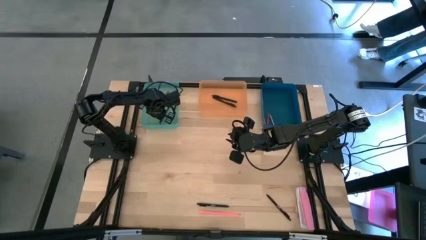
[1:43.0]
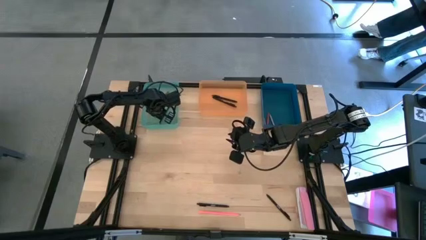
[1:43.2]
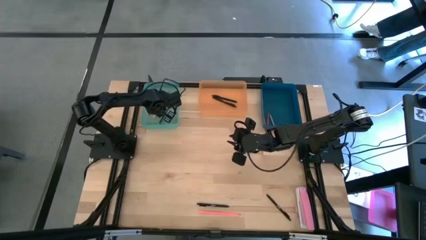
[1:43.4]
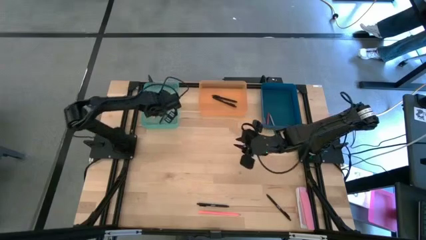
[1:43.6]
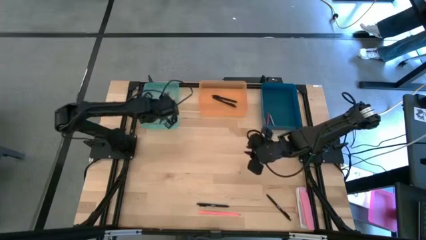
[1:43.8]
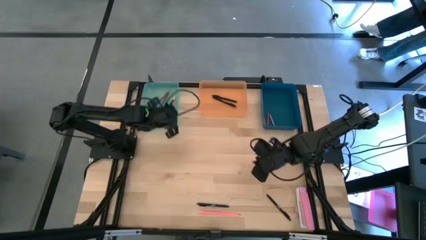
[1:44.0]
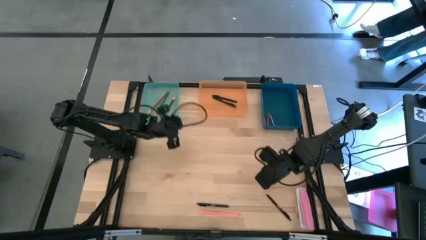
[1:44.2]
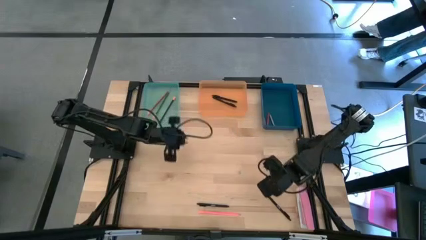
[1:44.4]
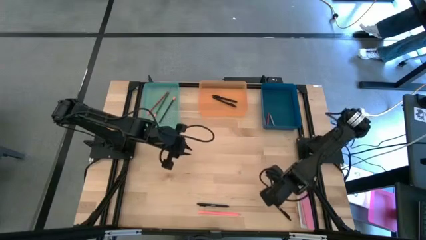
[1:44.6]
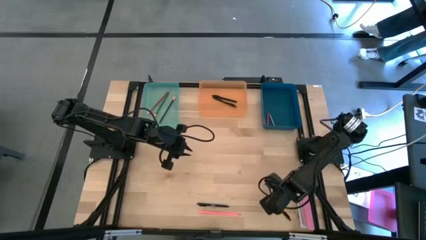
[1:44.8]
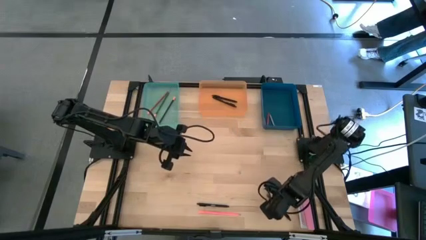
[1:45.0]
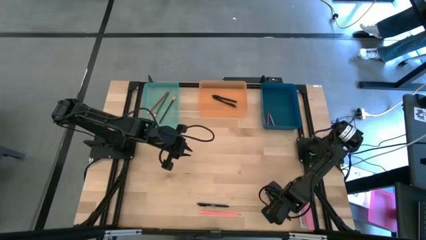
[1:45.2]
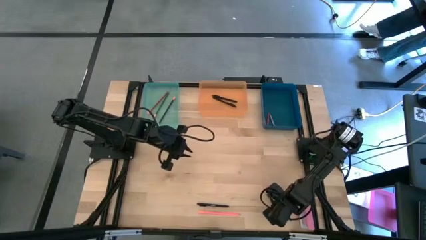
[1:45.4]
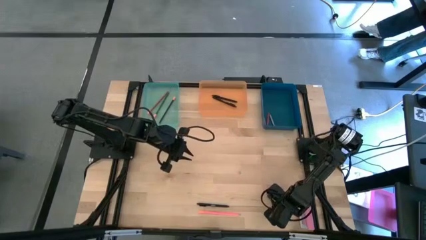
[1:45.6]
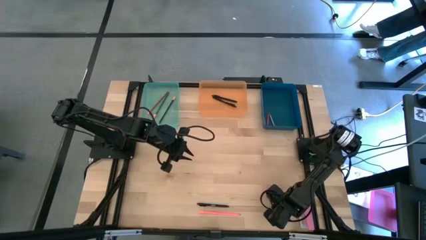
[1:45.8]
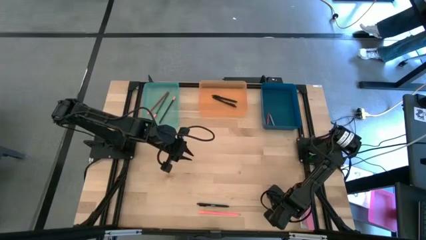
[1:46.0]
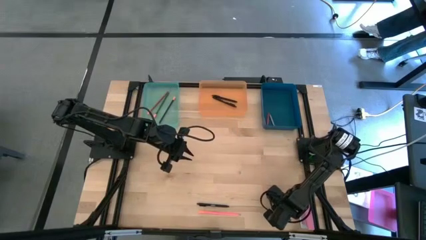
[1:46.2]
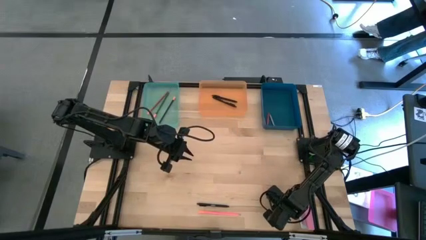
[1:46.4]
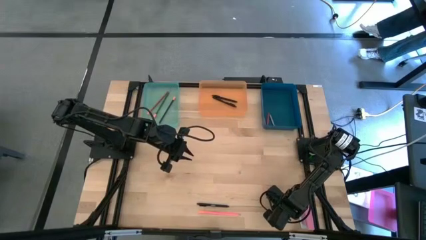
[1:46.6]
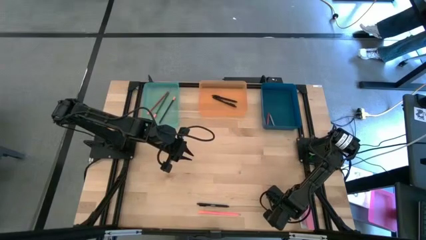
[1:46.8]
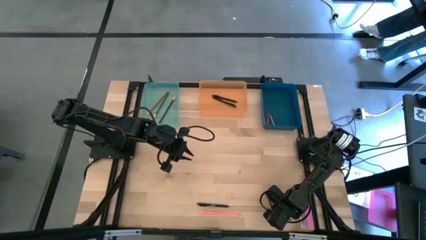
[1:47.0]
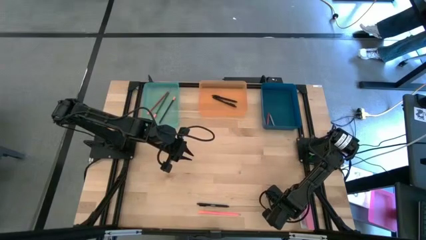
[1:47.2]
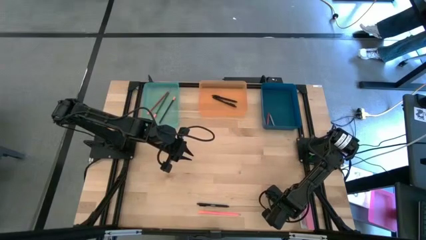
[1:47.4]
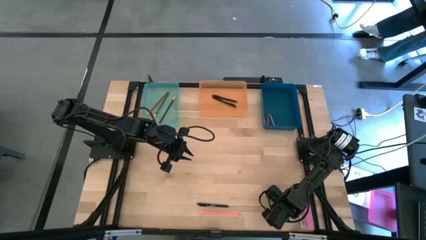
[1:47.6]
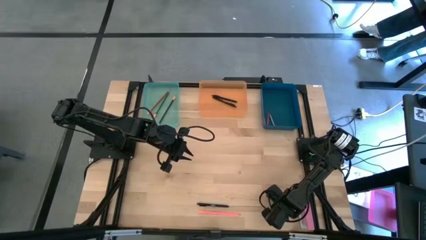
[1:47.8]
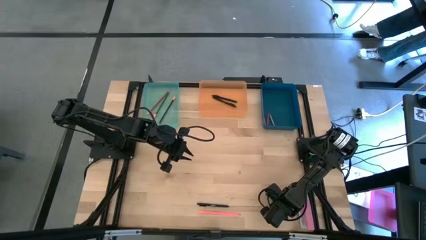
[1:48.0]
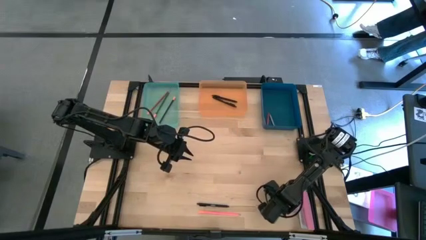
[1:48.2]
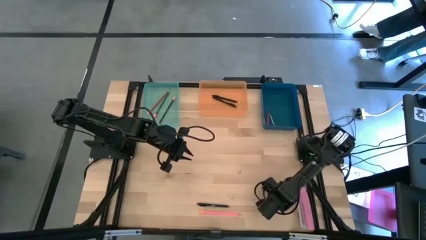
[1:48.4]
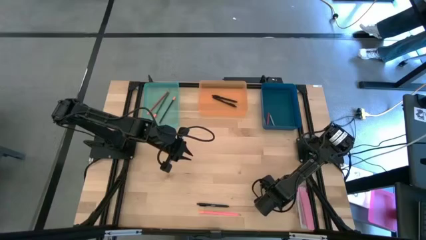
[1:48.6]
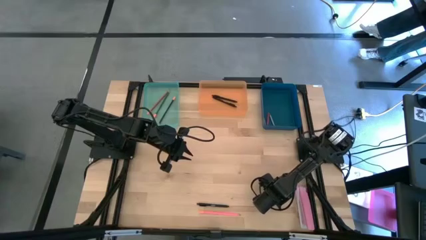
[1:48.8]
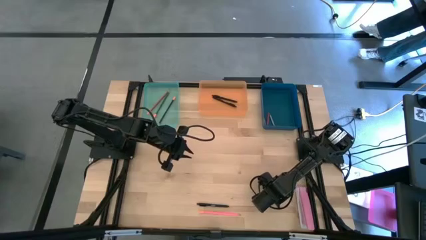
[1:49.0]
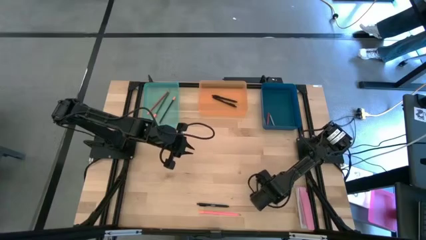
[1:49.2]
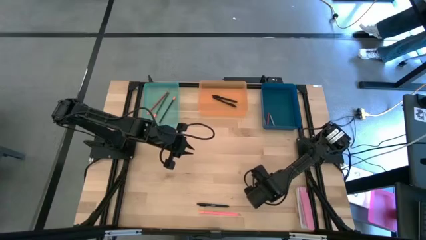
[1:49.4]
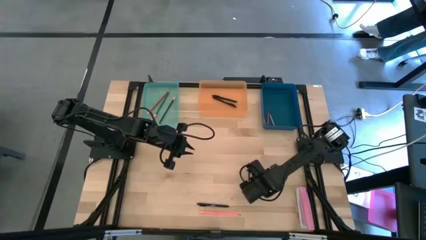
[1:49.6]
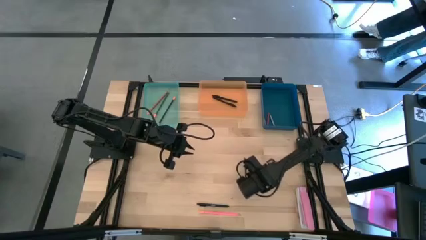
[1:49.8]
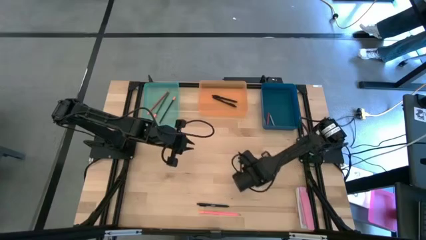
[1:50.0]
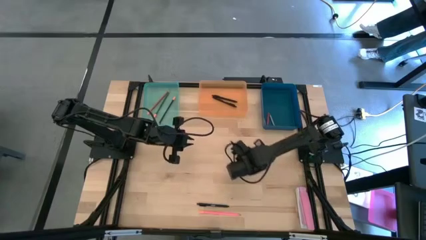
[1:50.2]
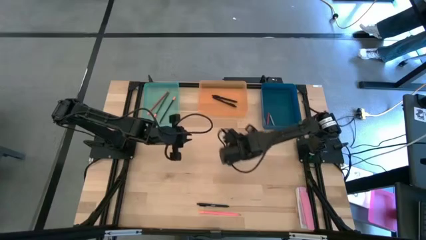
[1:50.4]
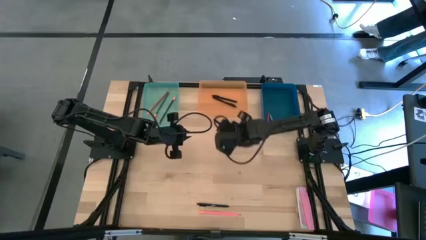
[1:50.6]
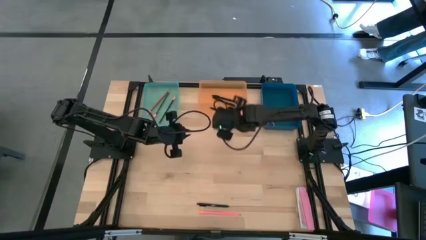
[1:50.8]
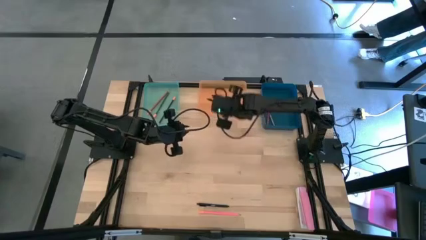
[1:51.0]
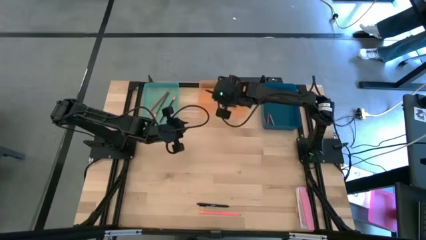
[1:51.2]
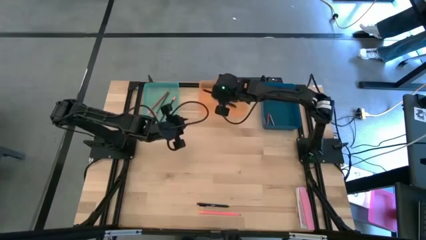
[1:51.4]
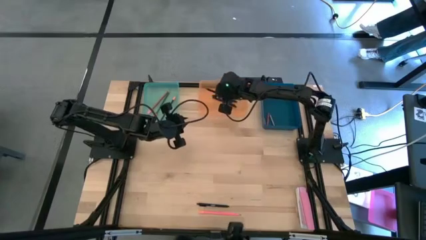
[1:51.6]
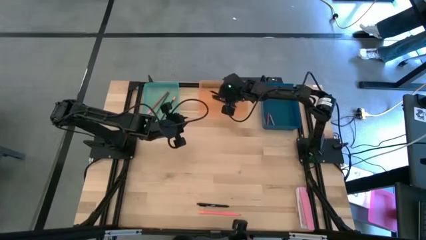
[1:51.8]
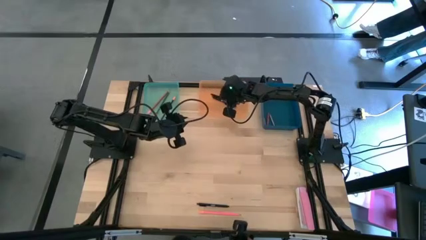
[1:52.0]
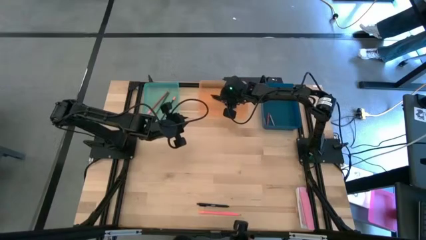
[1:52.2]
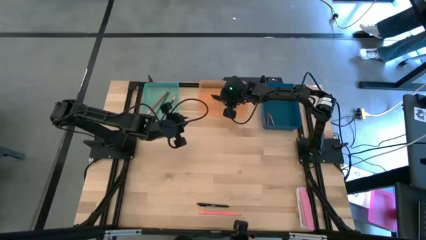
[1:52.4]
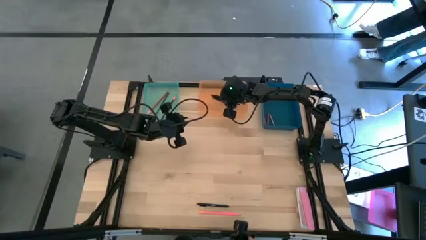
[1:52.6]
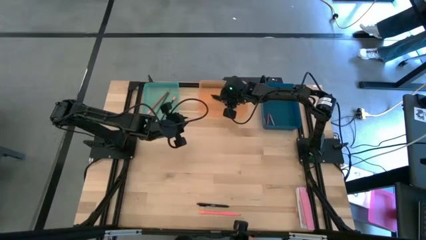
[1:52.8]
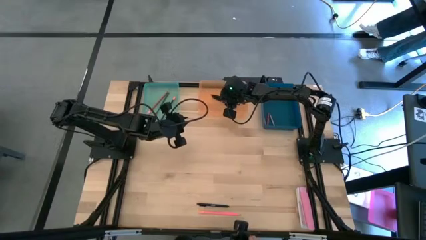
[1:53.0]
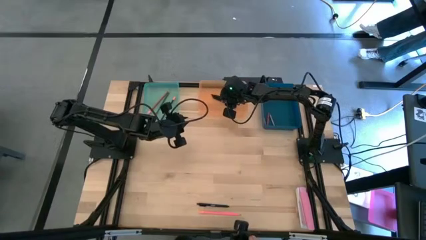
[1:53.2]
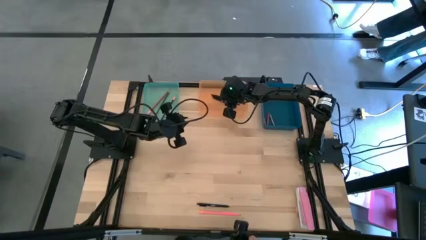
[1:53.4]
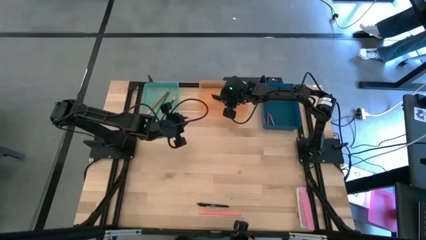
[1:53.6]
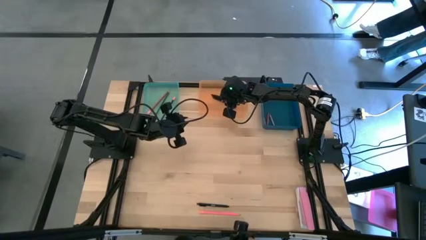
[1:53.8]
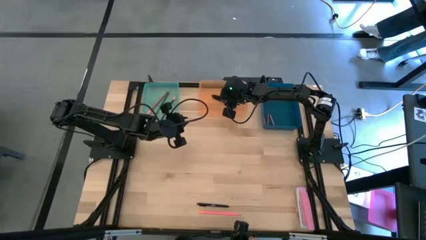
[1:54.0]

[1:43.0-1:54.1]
Task: Sort crayons/erasers/pens/pencils in bins
Put the black pen into the orange bin

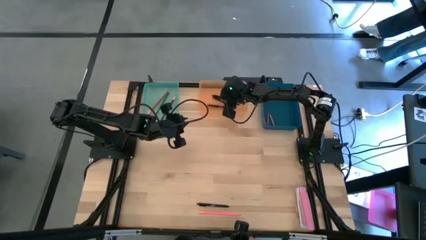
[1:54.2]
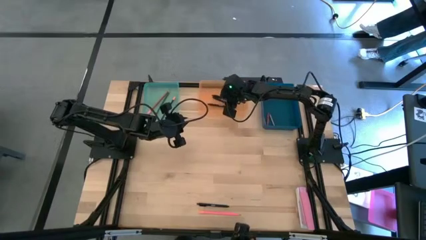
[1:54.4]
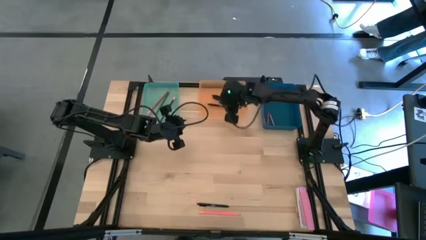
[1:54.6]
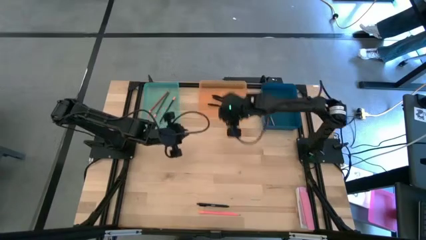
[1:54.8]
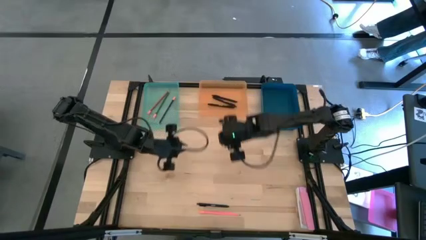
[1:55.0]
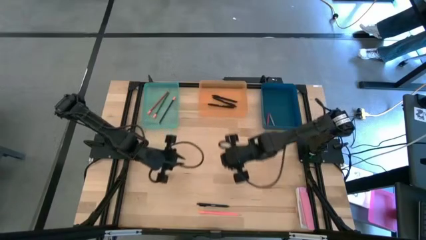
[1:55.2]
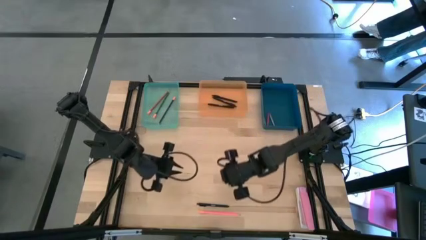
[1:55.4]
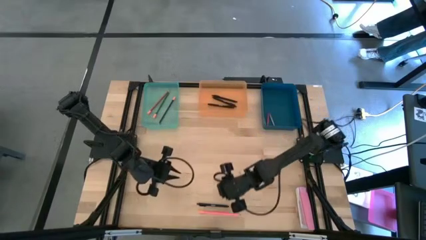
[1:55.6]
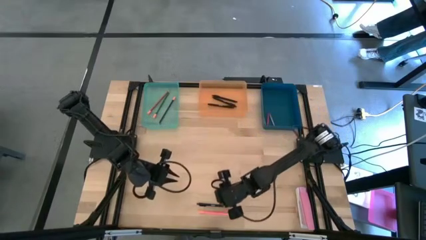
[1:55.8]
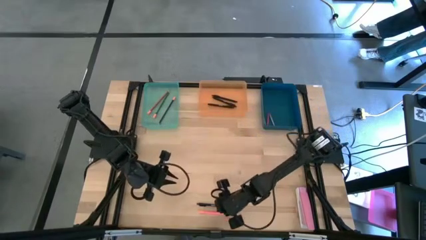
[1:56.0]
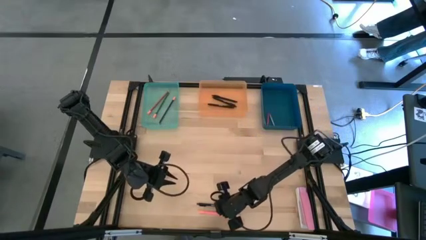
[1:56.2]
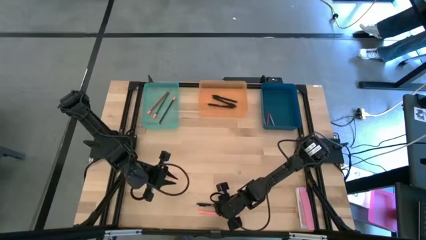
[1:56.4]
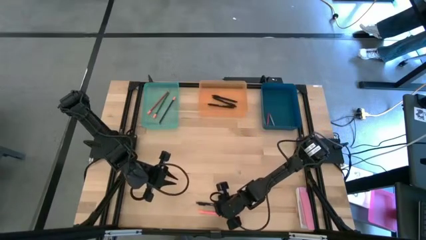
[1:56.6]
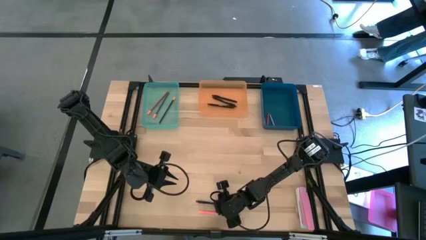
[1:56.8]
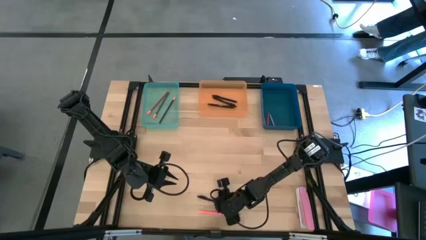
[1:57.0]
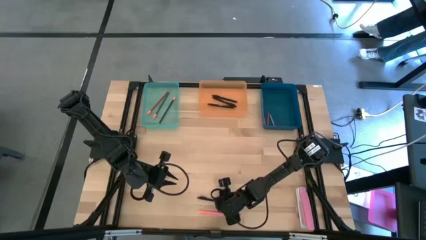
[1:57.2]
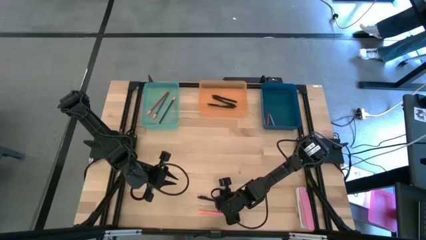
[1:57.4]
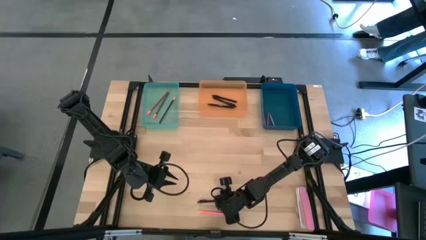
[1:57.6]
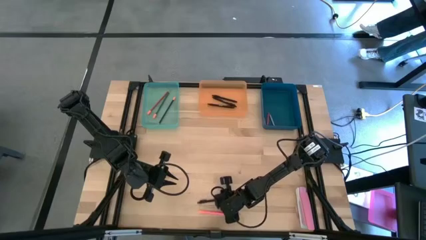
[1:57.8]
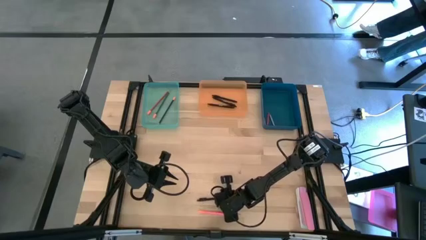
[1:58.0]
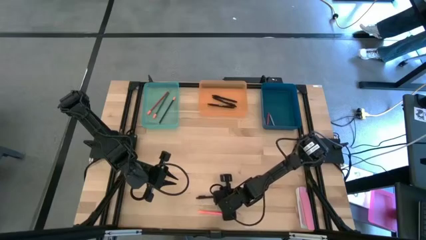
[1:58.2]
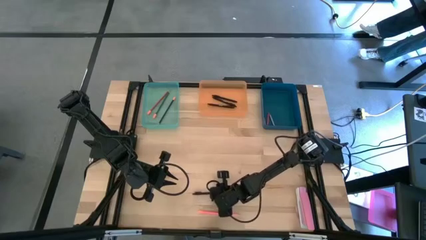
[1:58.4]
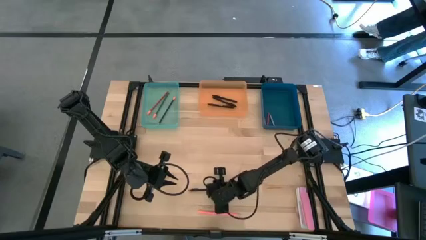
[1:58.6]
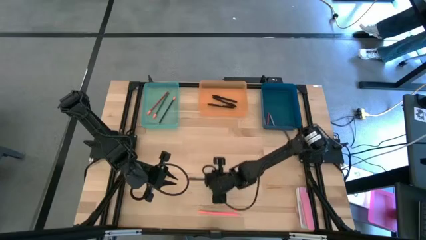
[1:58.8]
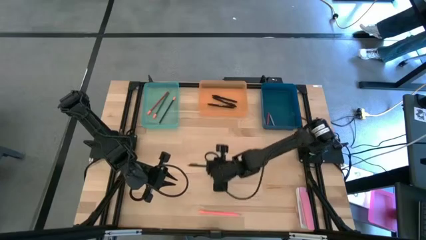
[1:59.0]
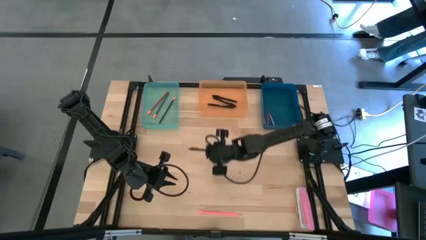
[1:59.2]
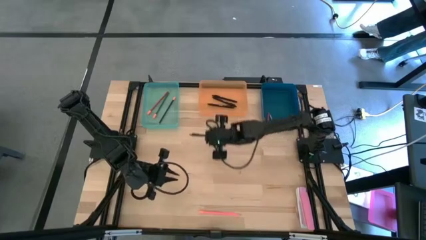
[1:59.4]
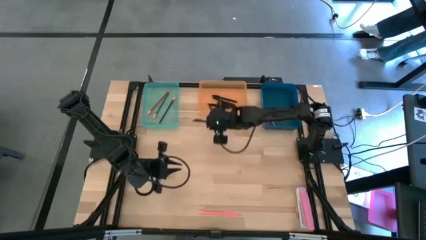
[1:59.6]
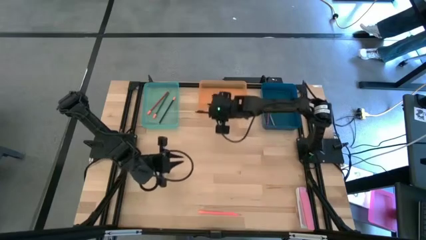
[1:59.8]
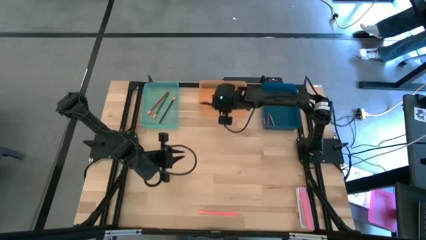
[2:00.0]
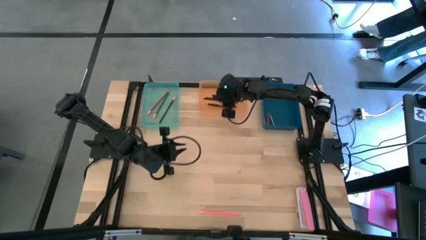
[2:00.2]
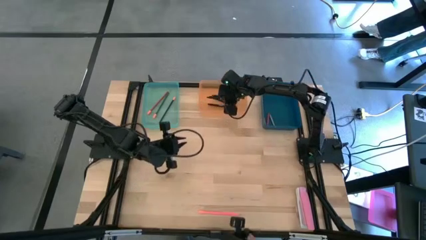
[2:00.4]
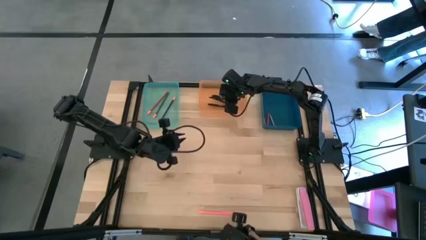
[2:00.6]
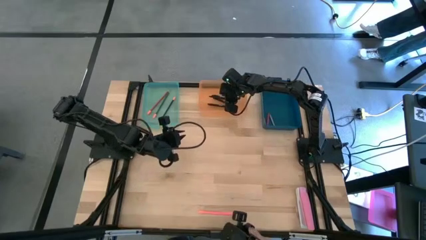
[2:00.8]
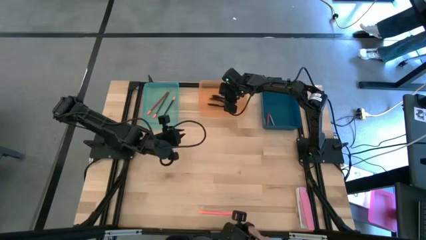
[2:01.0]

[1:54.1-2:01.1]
Put the black pen into the orange bin
